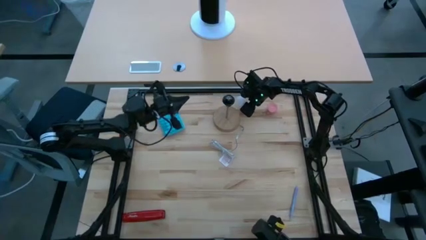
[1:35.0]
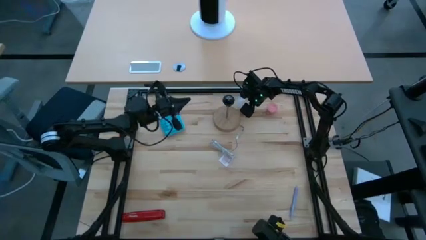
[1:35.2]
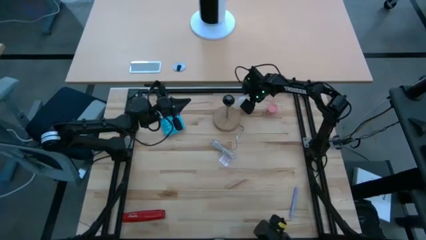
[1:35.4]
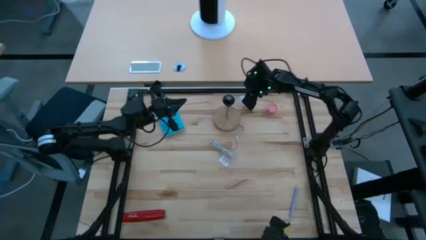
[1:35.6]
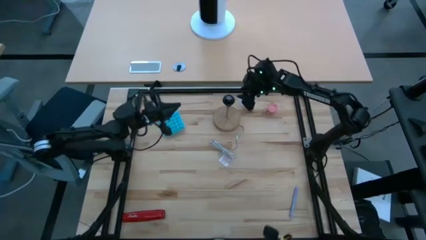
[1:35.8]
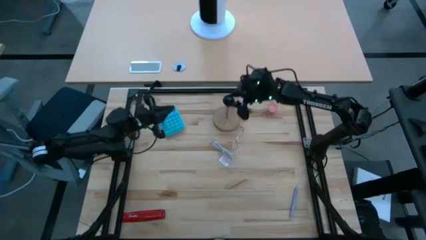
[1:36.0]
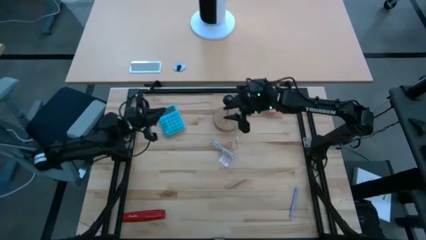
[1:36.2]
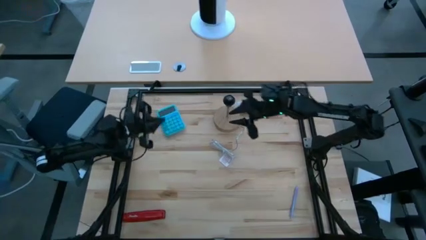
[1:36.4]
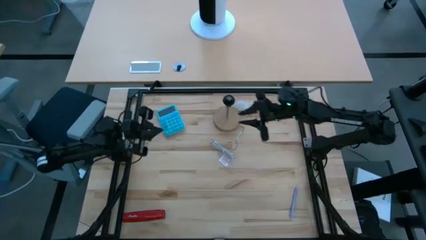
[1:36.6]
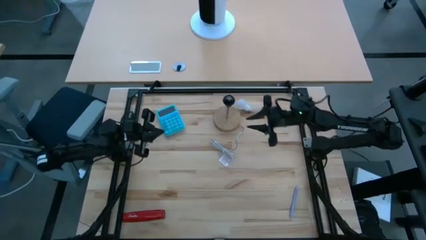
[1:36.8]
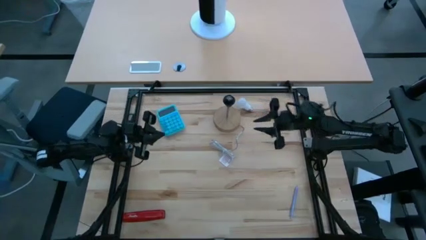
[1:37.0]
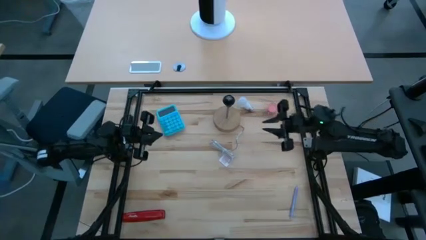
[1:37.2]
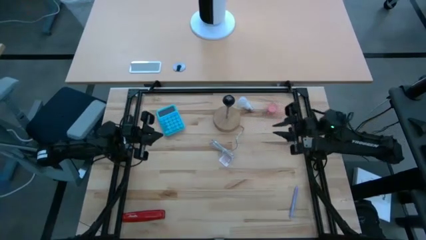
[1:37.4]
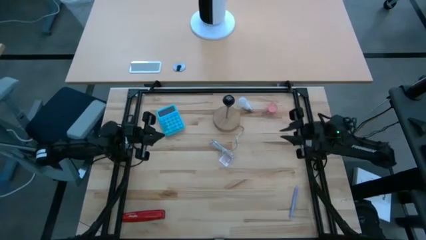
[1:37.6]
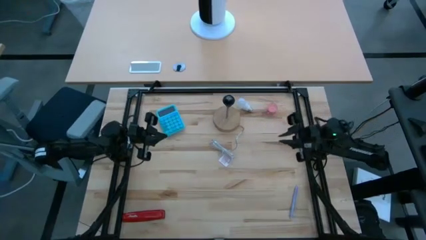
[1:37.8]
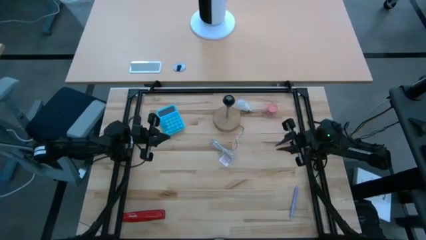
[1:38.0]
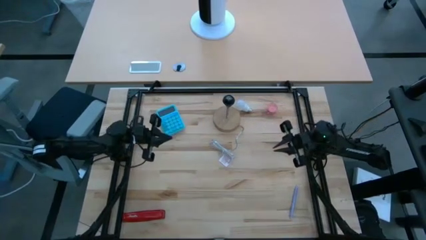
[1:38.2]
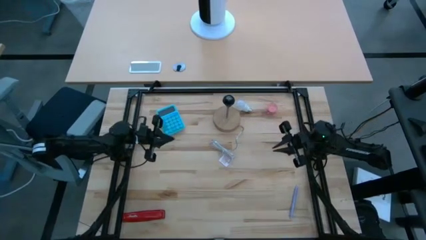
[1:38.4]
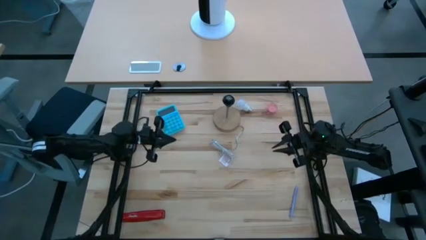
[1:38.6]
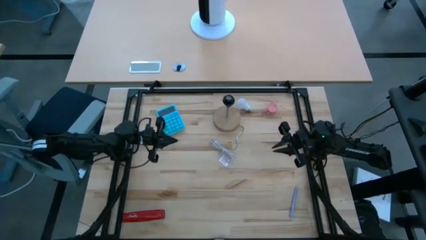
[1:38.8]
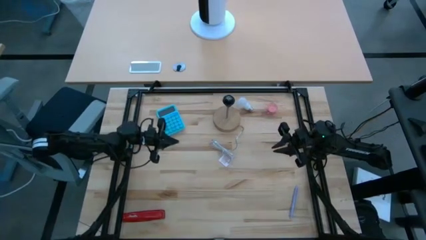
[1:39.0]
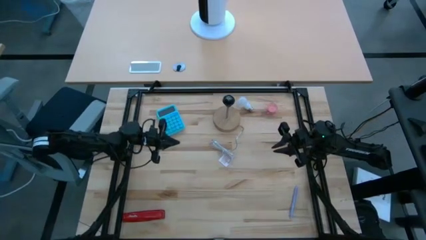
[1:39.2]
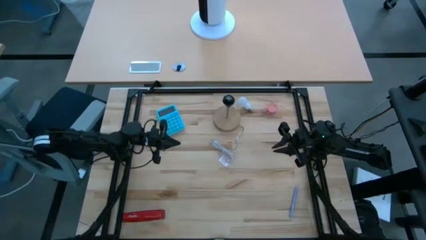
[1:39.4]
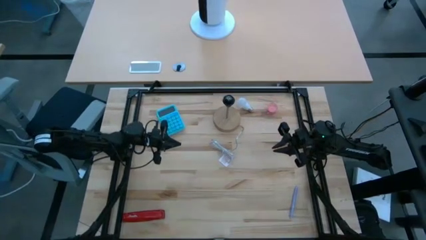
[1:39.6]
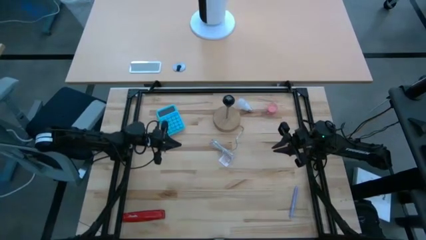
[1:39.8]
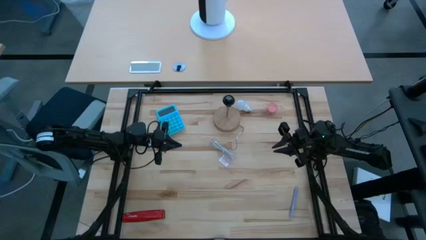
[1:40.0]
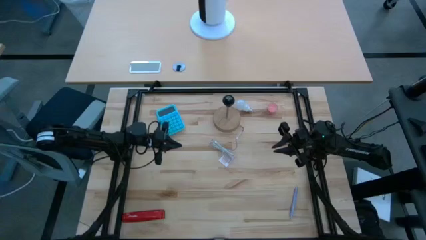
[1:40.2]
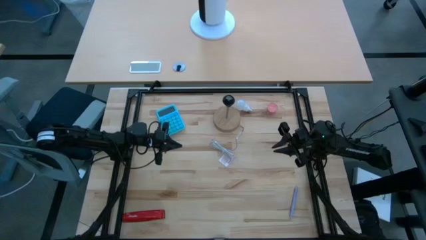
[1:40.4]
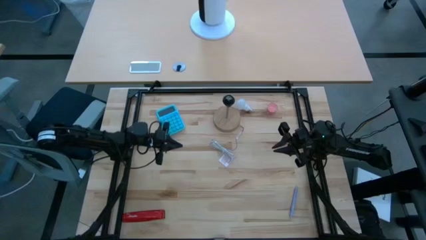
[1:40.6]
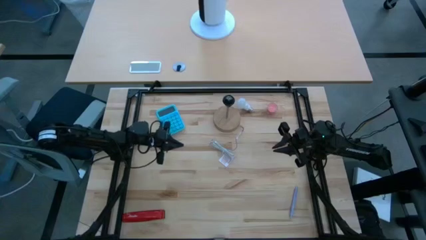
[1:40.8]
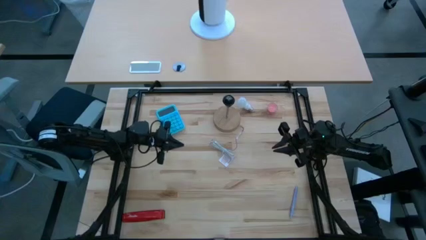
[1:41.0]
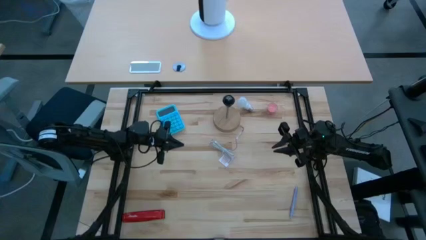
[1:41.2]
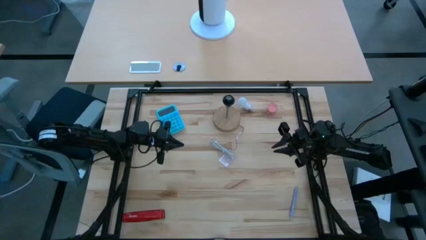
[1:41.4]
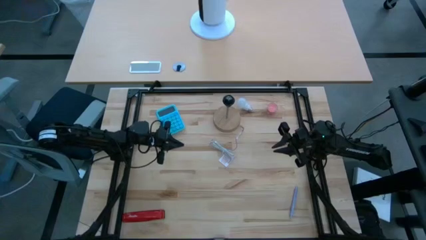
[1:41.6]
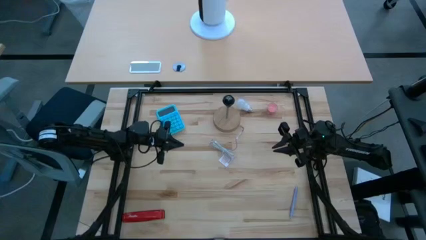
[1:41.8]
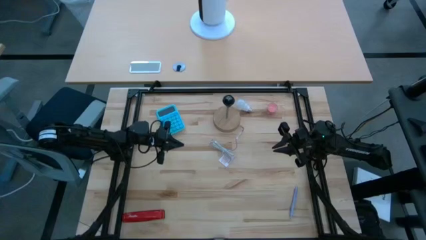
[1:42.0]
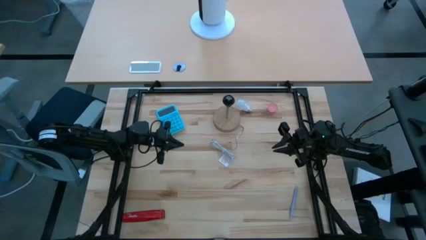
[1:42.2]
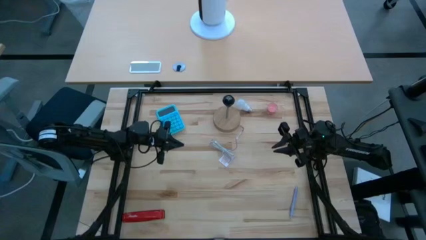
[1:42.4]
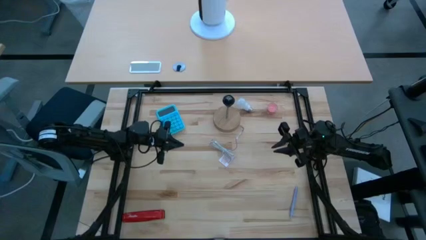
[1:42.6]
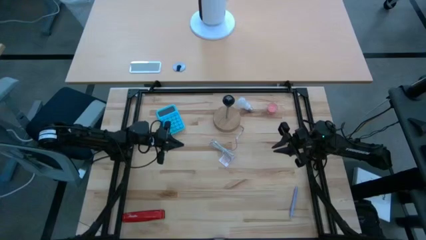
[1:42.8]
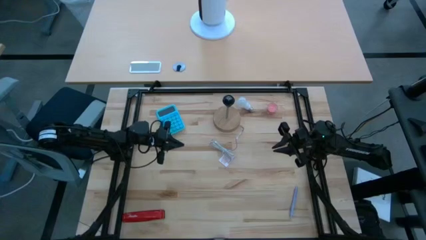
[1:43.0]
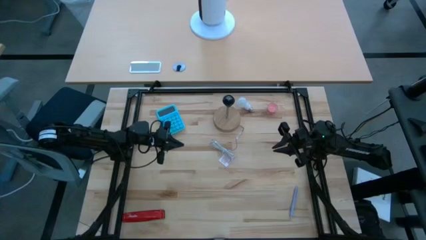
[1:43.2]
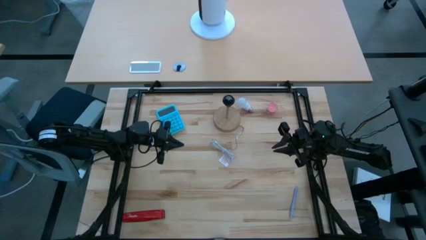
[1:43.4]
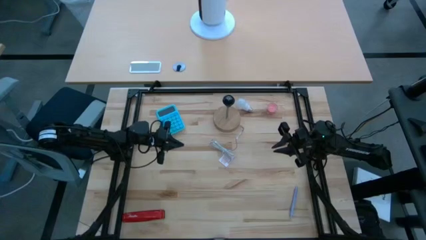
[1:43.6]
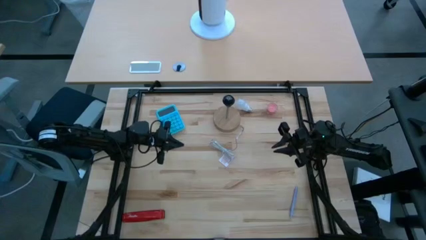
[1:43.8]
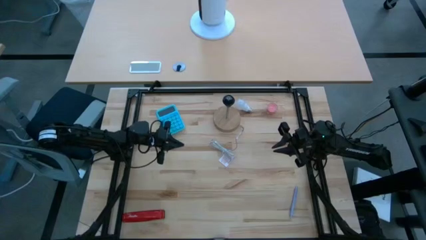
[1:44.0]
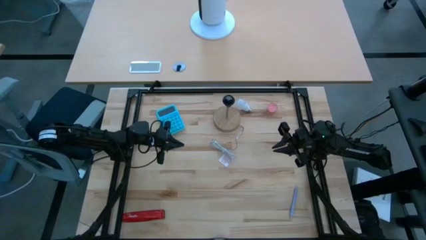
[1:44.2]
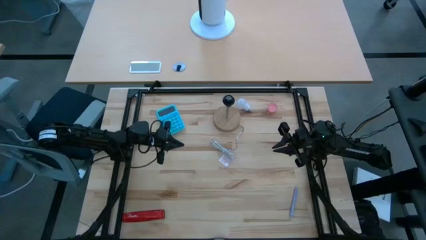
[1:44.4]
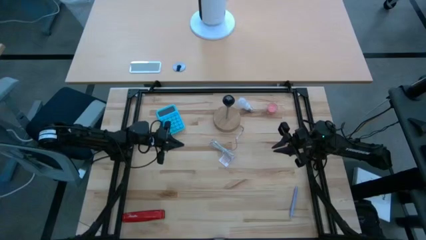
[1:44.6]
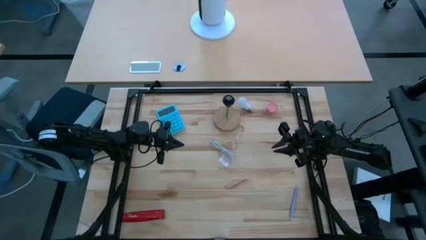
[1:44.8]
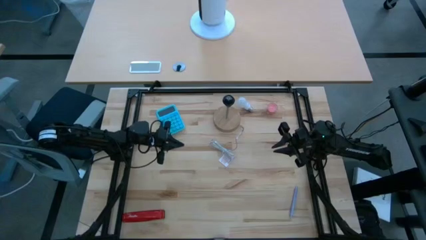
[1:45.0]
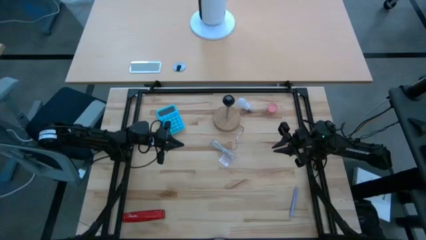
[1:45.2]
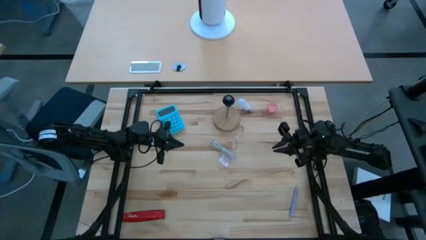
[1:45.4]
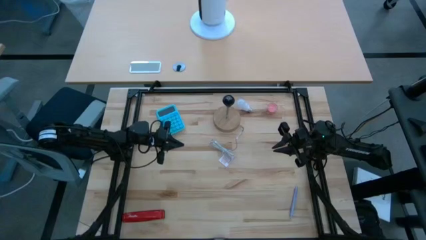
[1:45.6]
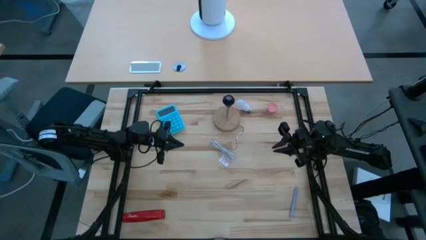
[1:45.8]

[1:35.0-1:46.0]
Task: Screw lightbulb
Return to Home Position
